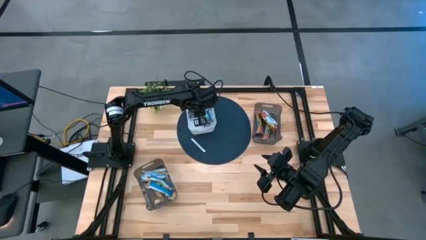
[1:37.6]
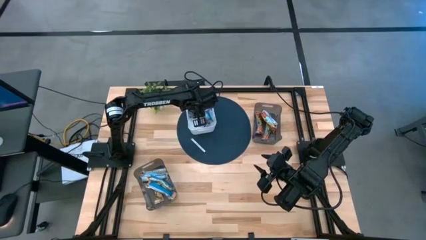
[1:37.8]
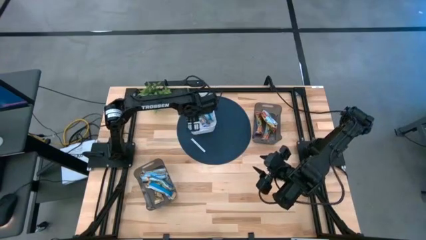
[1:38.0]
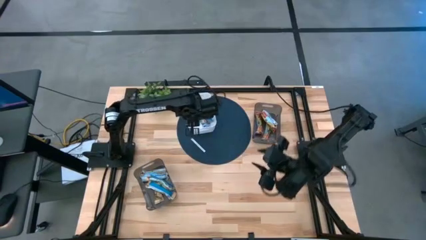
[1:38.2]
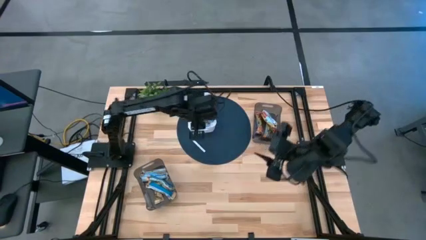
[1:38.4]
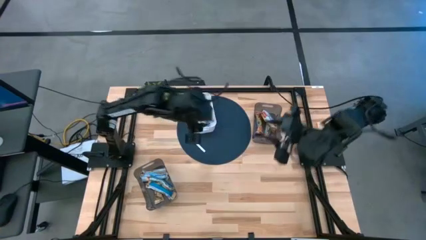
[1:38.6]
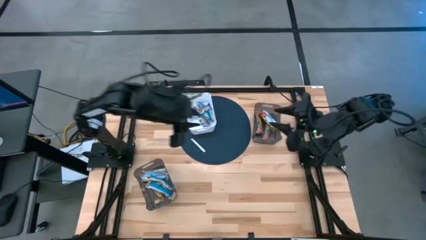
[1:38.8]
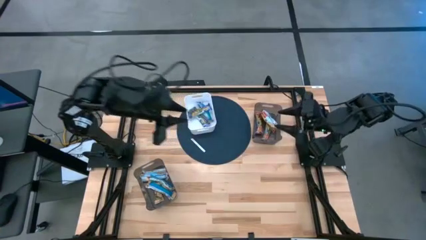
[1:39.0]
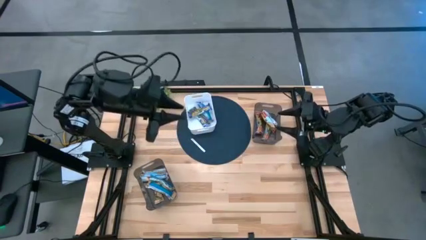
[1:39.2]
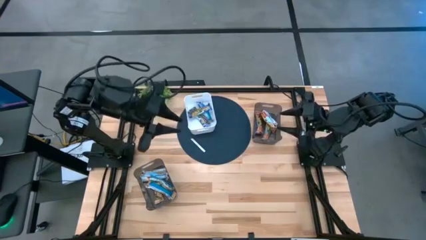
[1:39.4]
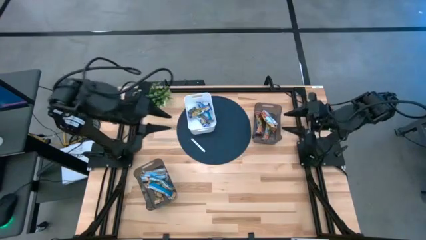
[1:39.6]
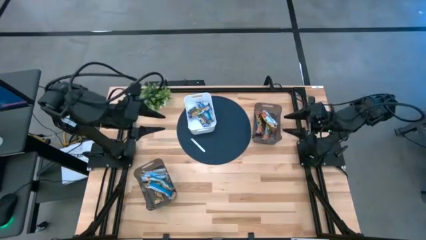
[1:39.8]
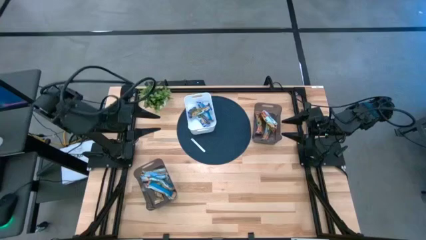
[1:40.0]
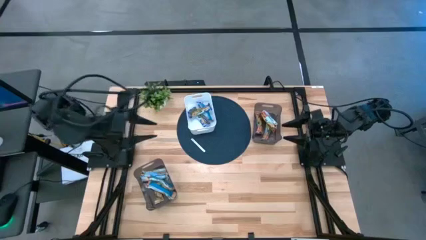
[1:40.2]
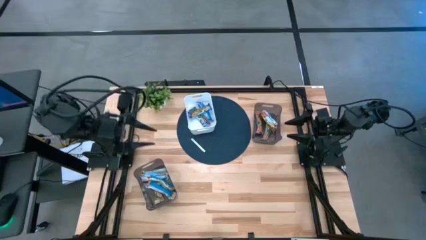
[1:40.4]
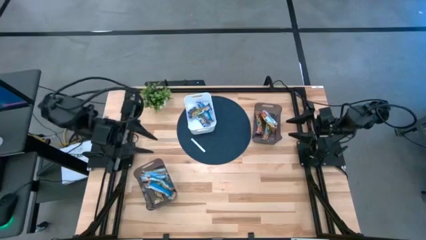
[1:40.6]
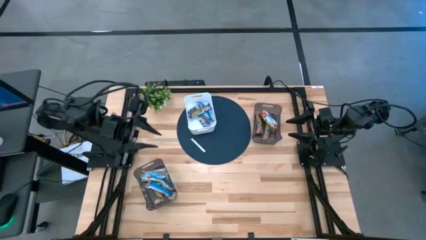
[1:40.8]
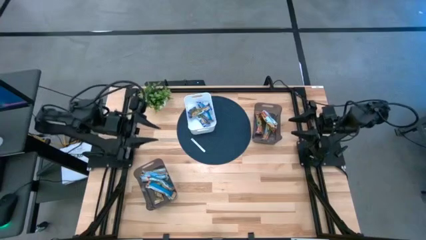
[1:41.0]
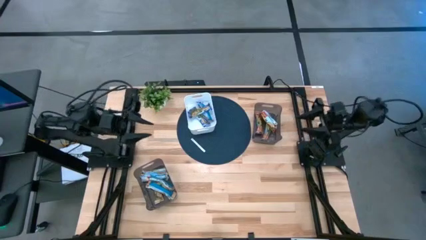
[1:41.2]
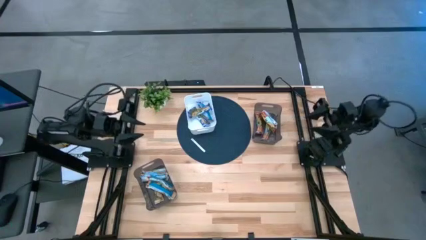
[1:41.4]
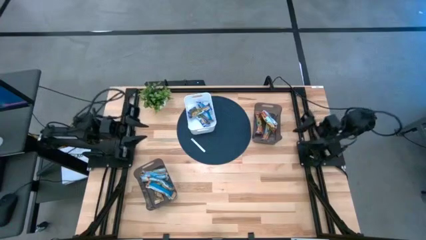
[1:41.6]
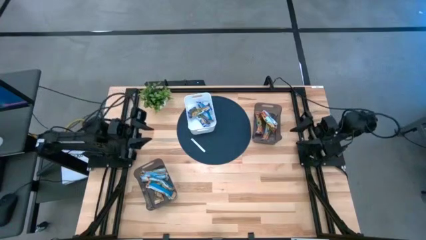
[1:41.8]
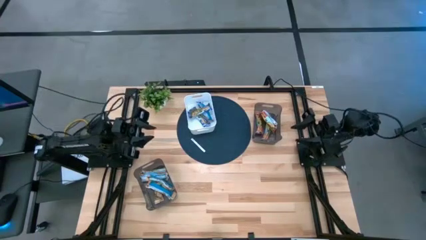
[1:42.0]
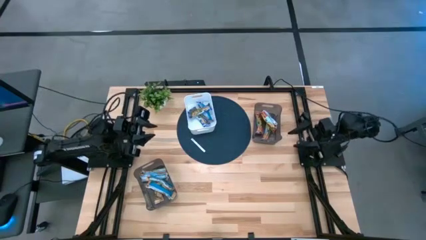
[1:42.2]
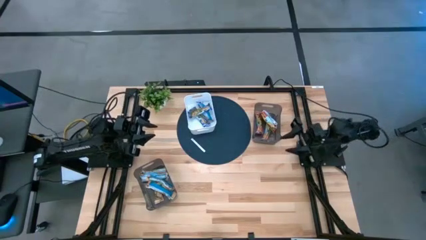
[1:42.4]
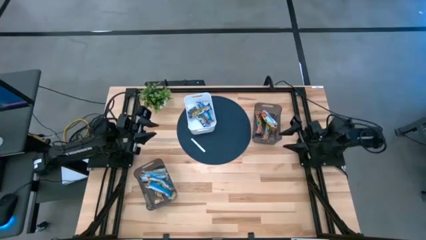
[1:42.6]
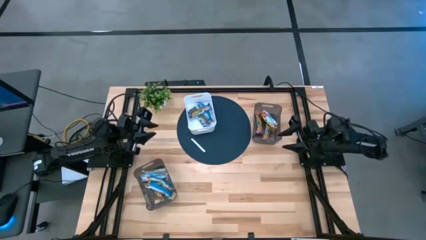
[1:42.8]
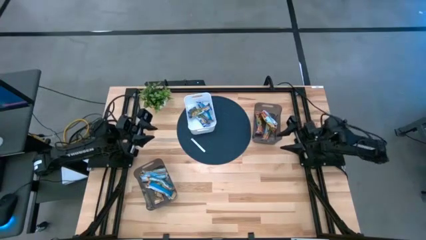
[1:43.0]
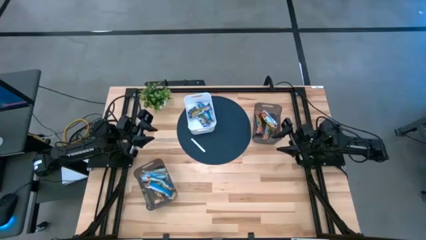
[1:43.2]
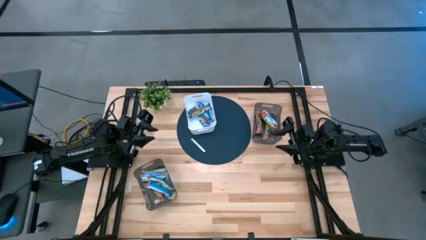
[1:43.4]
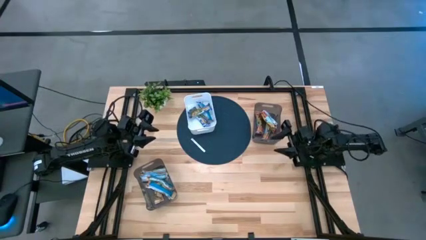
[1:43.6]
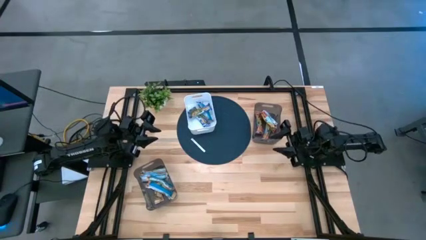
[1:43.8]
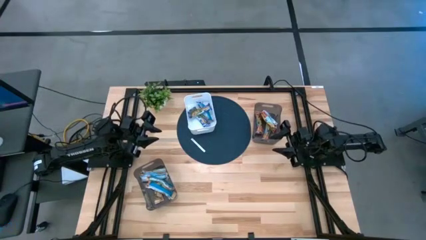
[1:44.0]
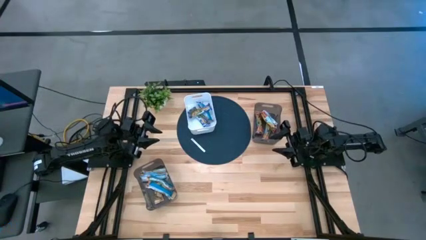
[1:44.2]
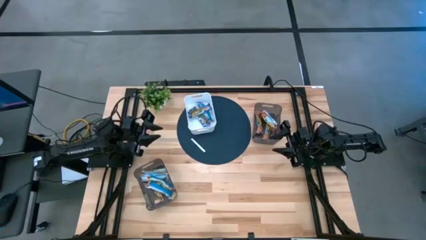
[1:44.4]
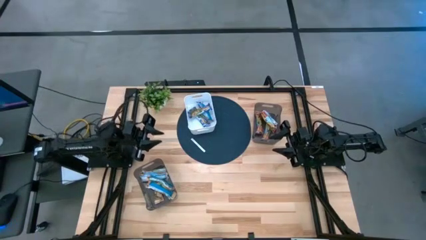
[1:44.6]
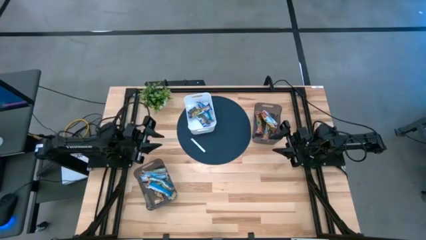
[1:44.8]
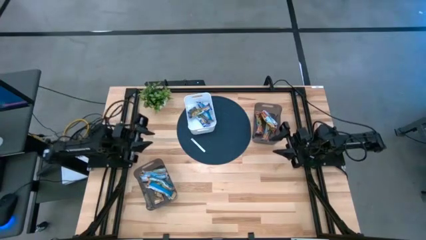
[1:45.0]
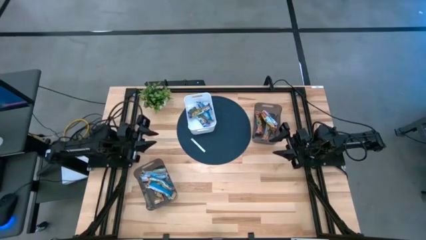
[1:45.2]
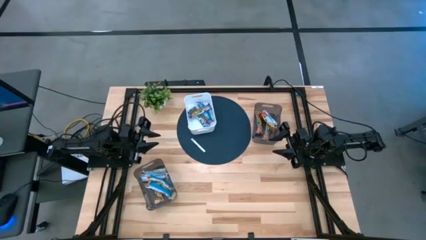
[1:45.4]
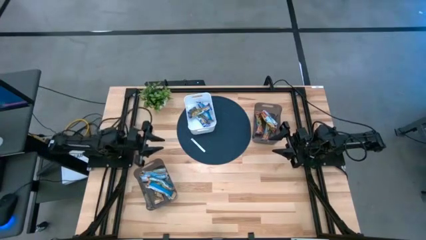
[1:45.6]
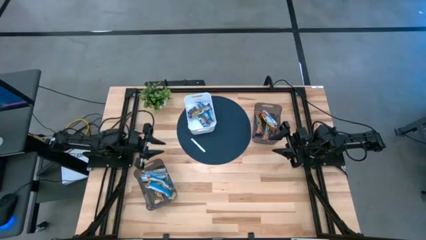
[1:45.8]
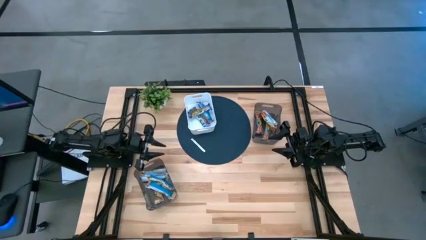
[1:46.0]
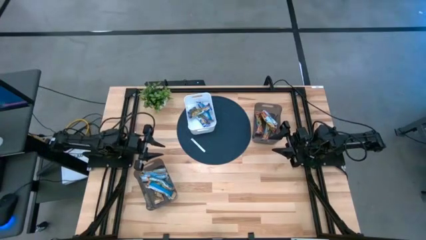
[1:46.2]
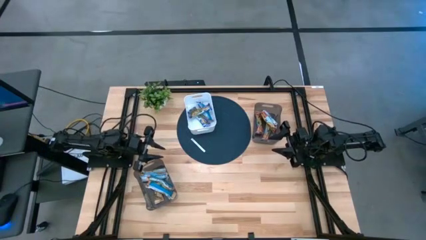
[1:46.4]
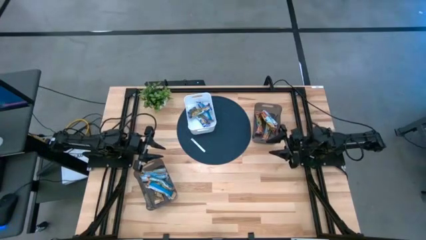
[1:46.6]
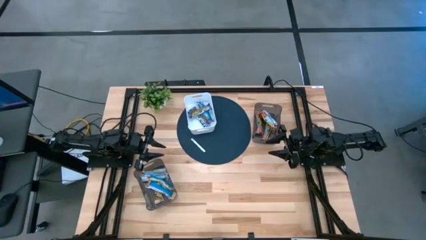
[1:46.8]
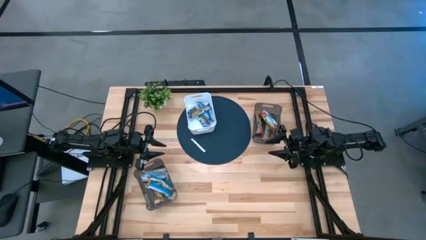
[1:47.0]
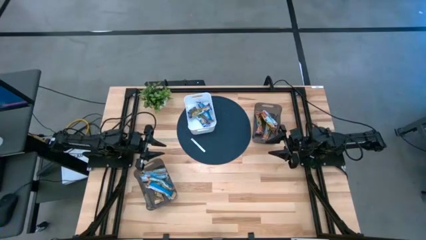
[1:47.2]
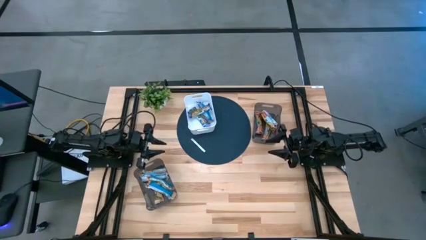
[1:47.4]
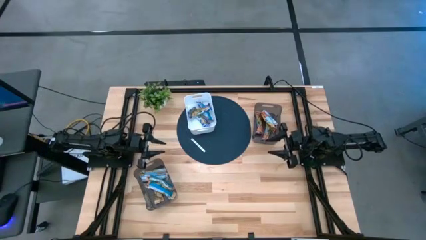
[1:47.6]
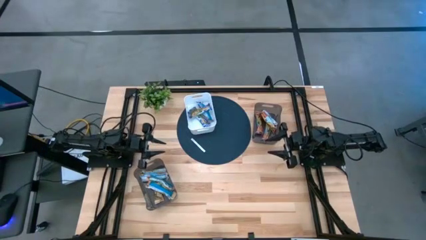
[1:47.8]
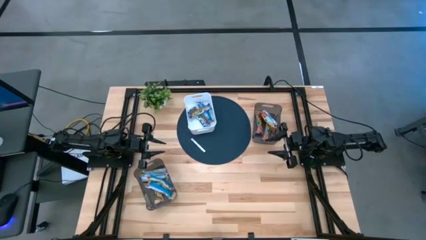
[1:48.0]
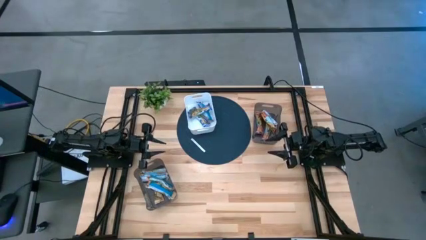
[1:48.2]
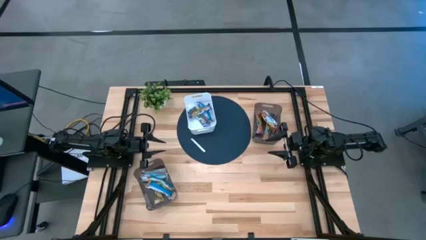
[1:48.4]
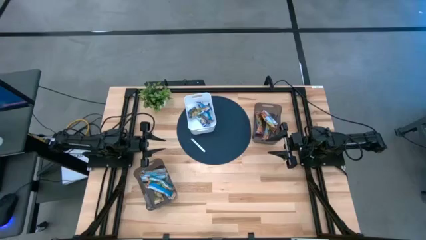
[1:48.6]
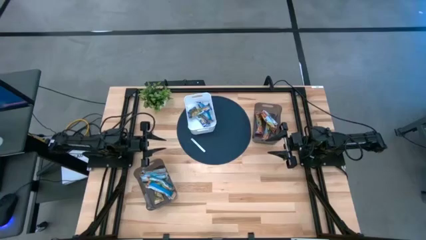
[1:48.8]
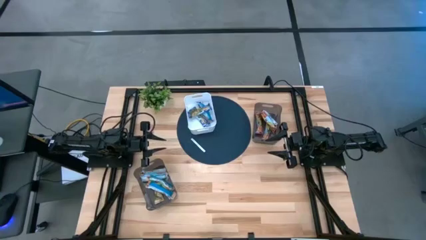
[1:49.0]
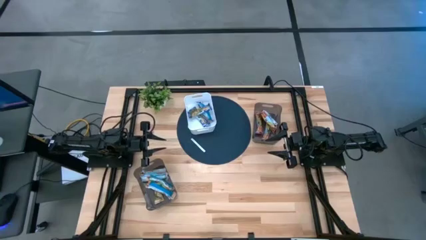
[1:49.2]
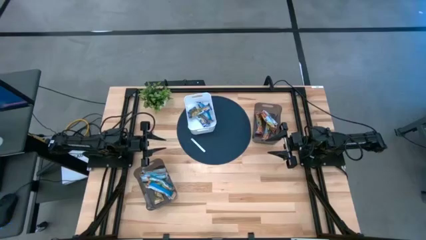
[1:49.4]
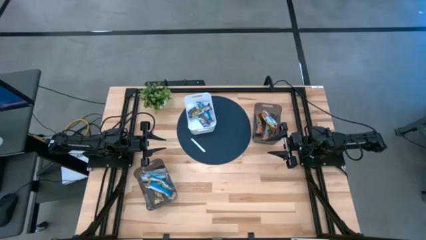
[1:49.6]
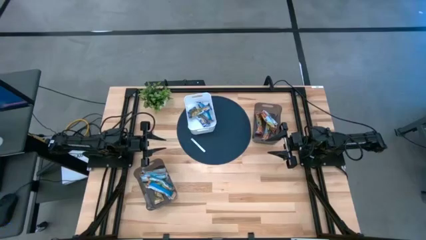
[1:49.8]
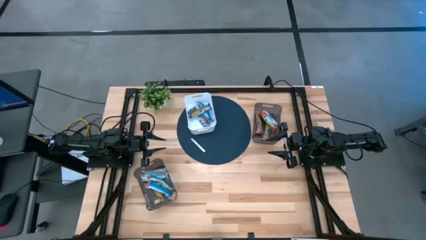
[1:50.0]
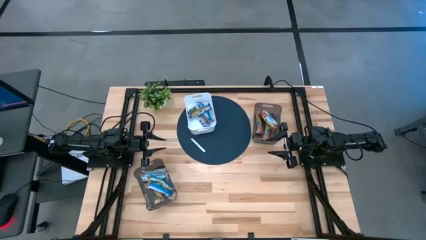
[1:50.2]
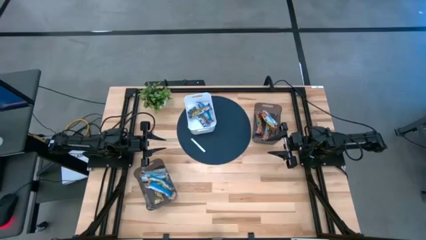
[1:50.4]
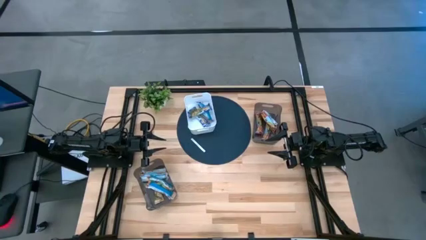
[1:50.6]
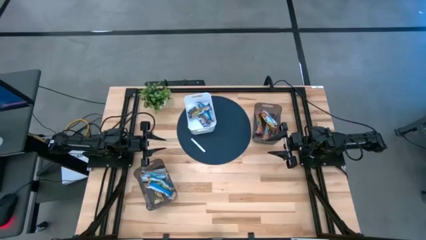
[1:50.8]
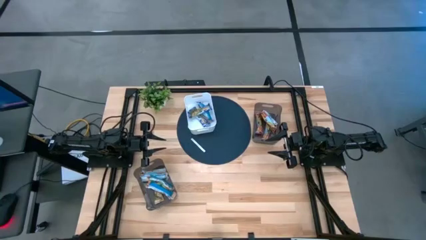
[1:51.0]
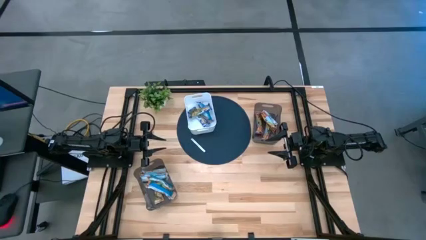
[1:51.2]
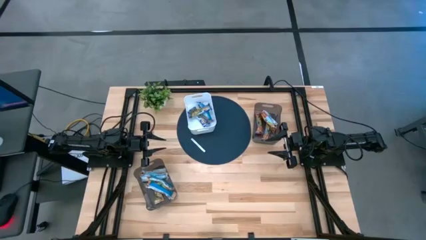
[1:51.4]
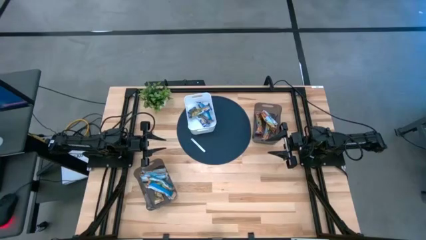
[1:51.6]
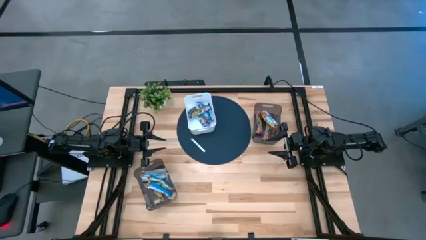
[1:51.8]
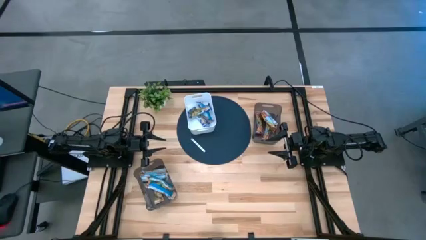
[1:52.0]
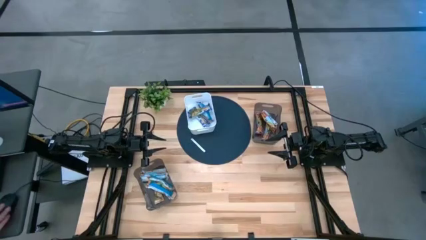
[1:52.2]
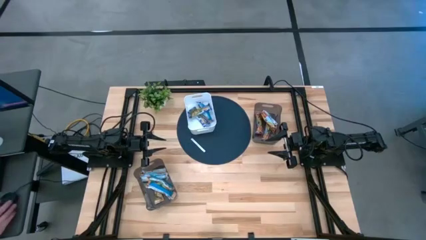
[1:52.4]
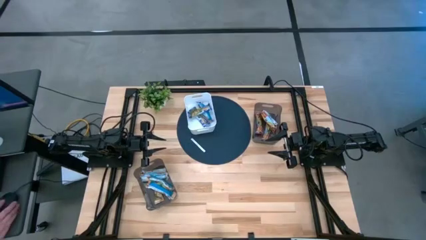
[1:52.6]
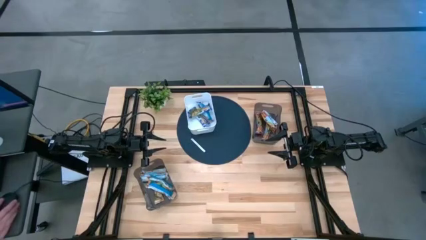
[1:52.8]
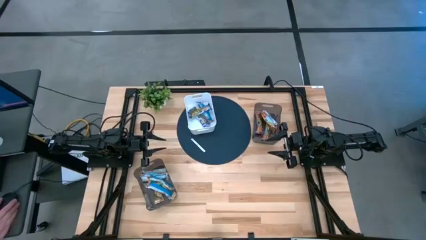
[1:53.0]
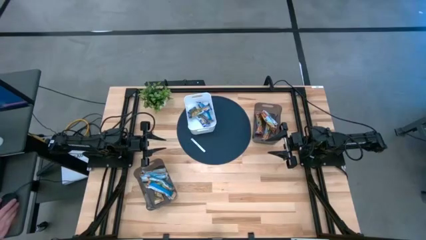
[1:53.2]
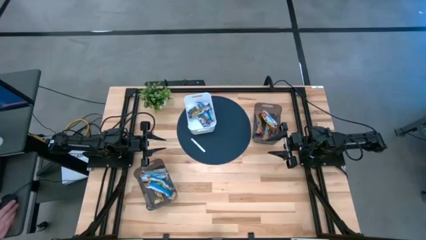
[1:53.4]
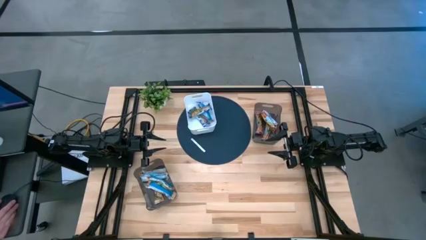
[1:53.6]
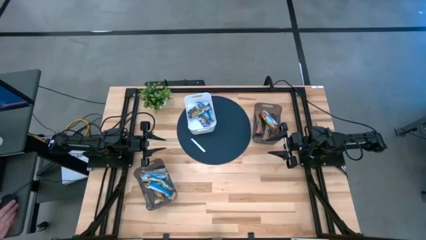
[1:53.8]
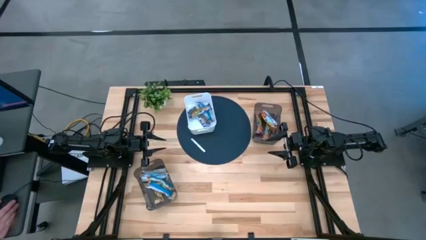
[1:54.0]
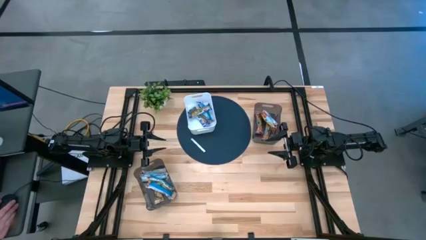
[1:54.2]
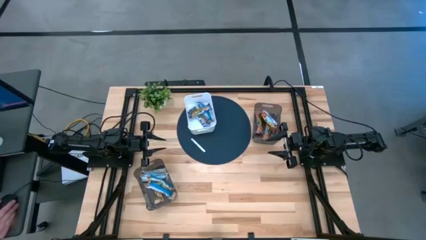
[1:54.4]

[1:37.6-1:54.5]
Task: Pick and place Granola Bars by type
Return to Home Position
